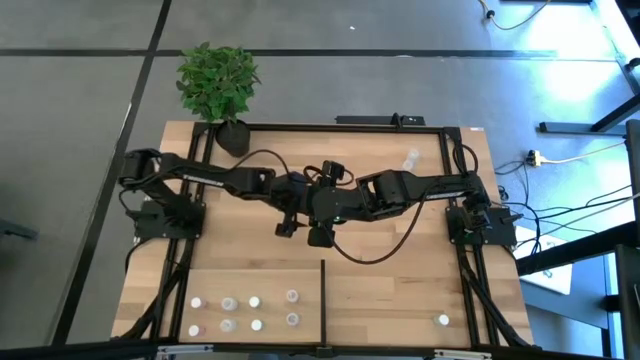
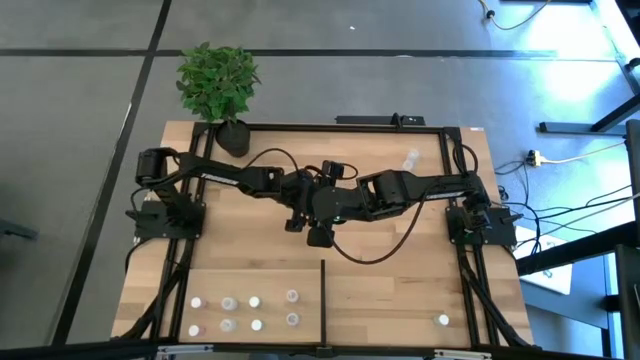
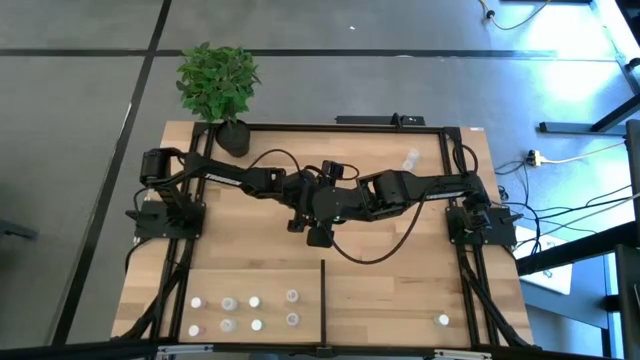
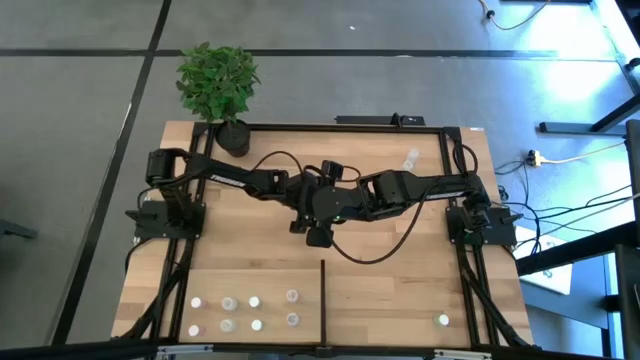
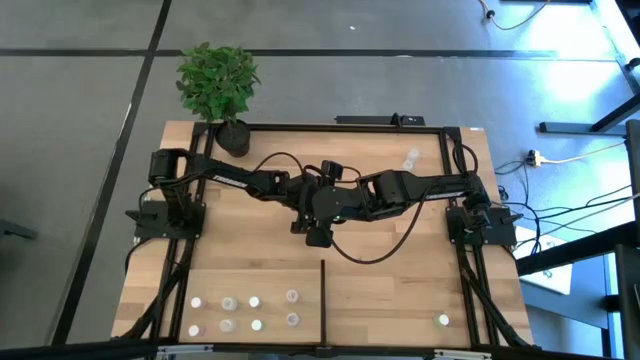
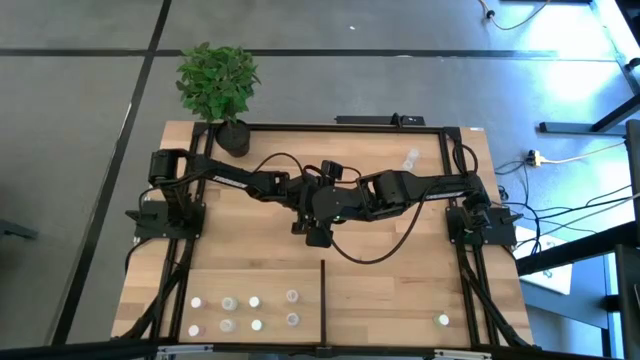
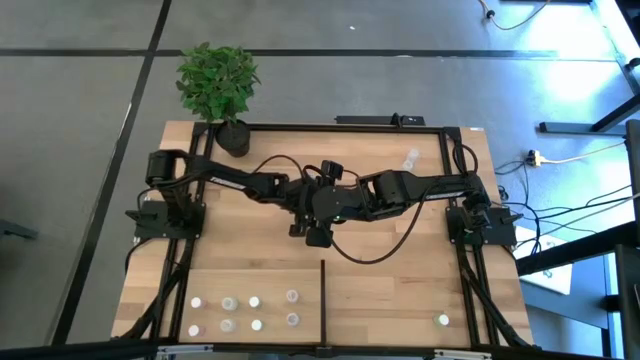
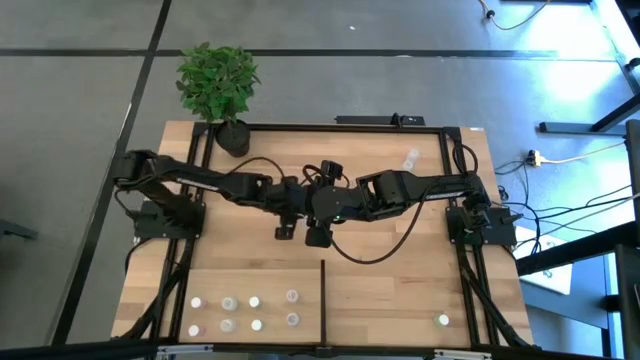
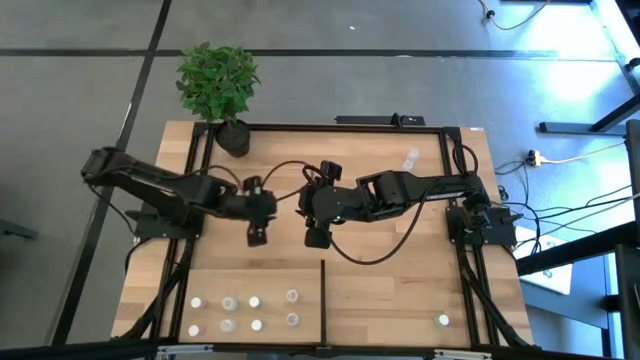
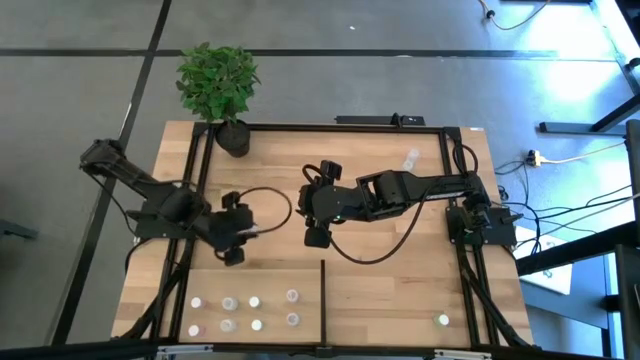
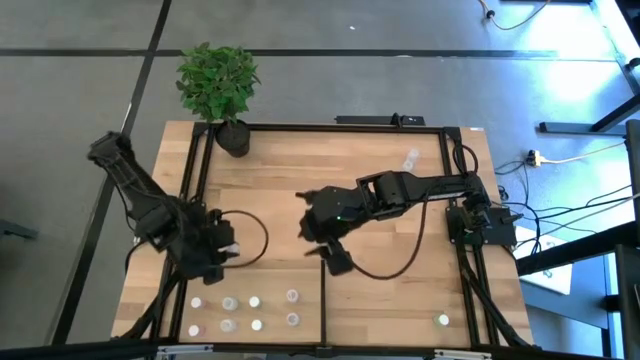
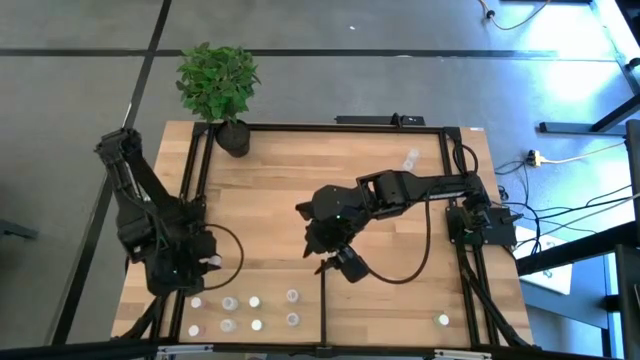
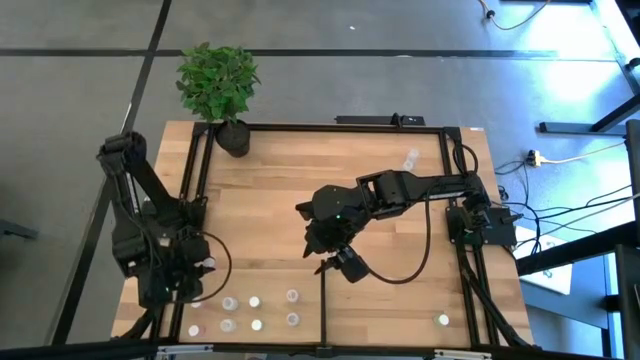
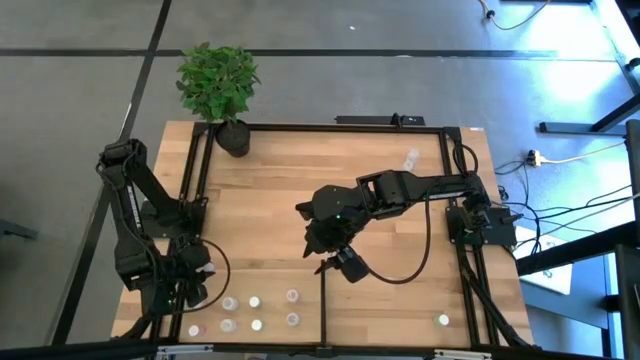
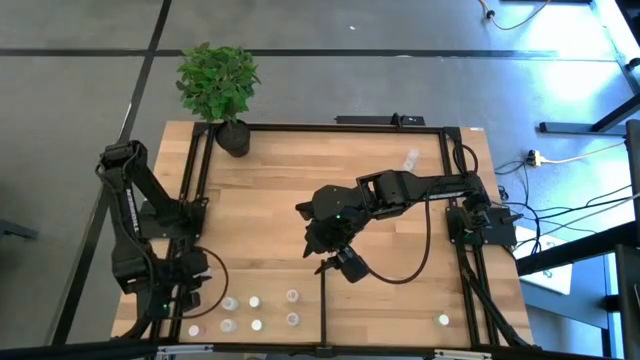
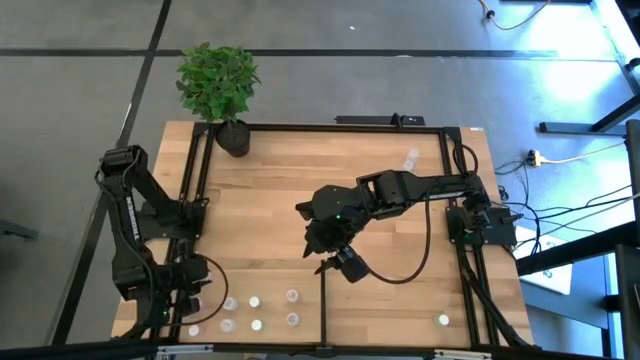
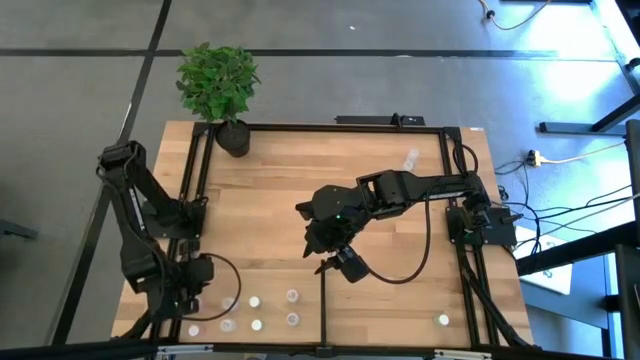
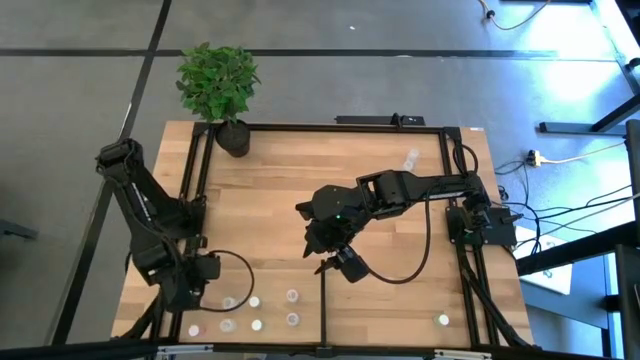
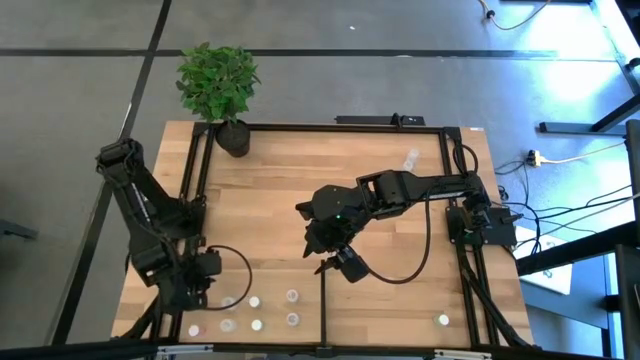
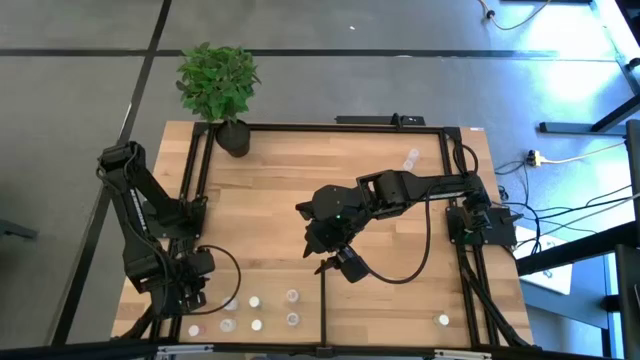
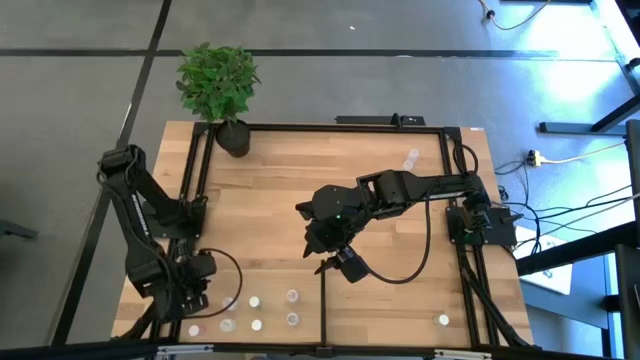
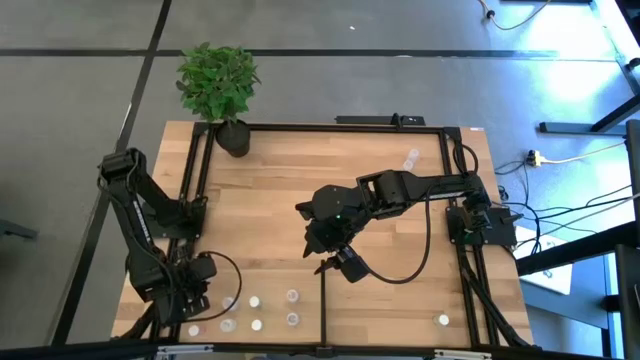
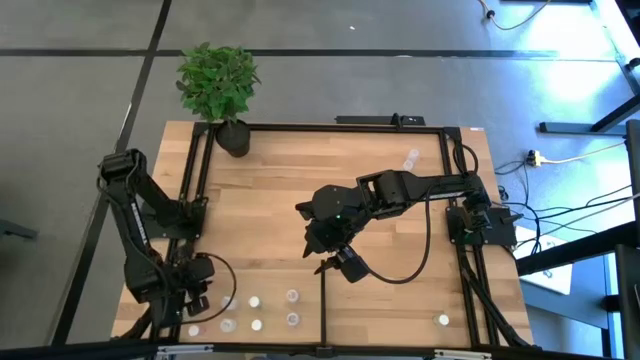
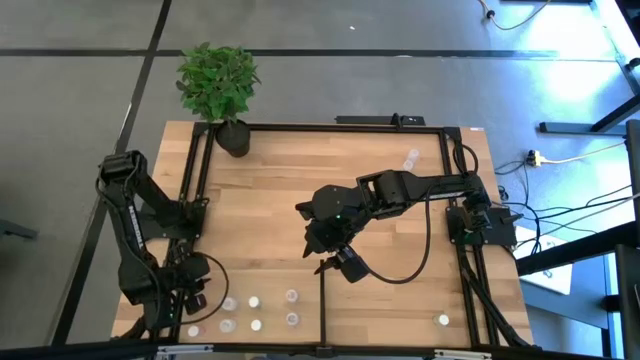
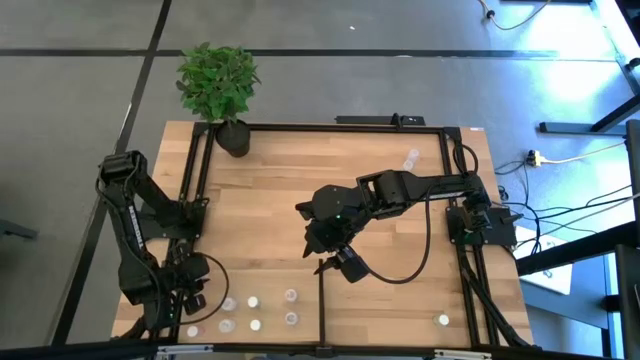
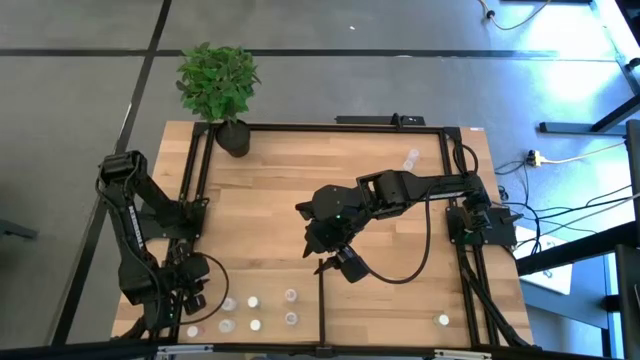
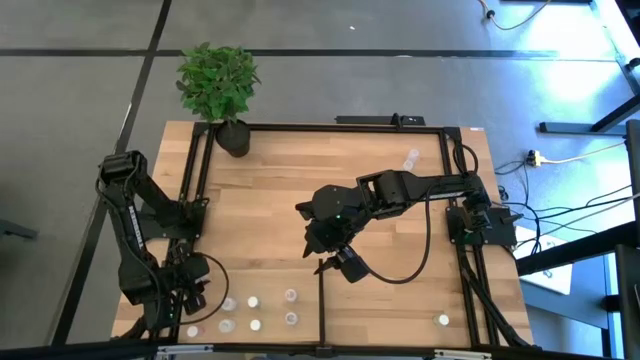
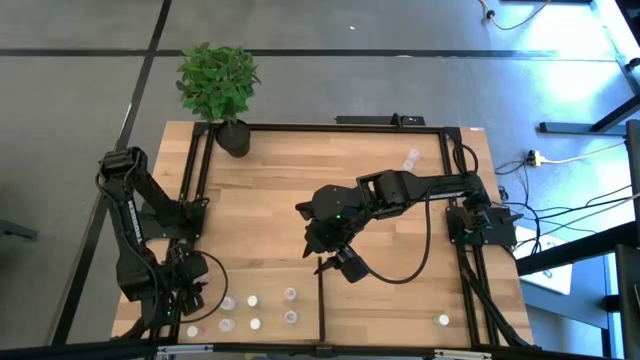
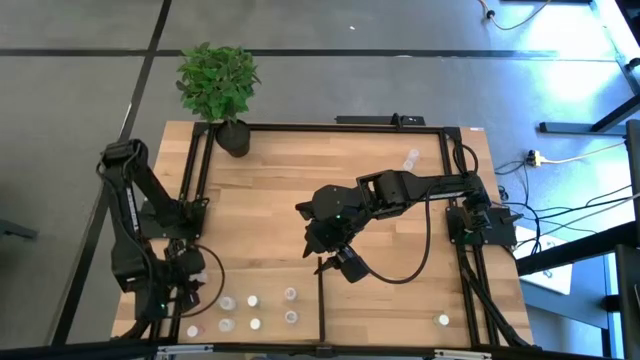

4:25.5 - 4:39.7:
Task: Pick and place medicine bottles onto shelf by color
Put the pink pill bottle on the shelf aligned with the other pink pill bottles

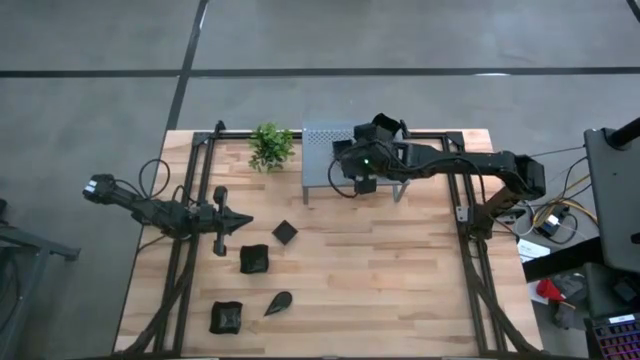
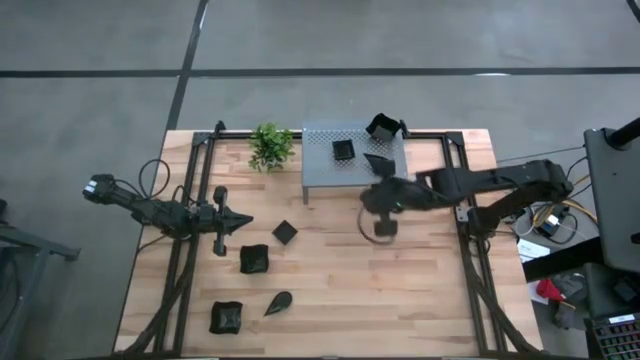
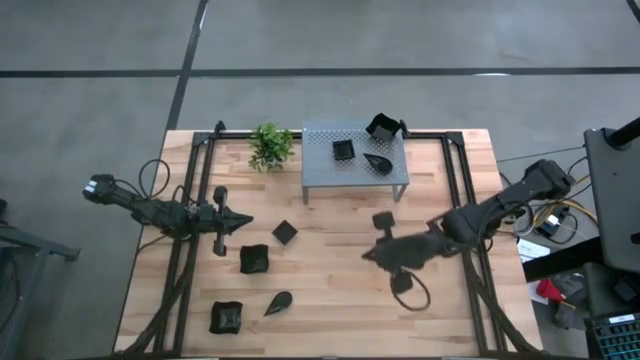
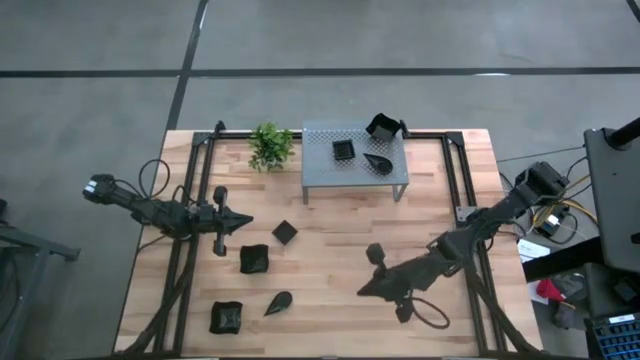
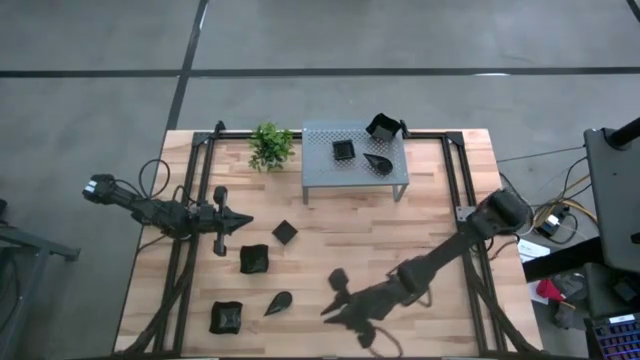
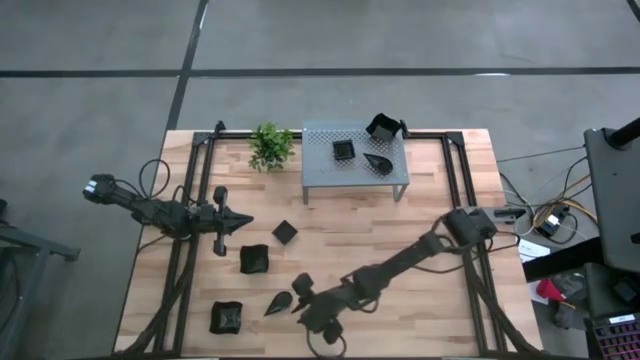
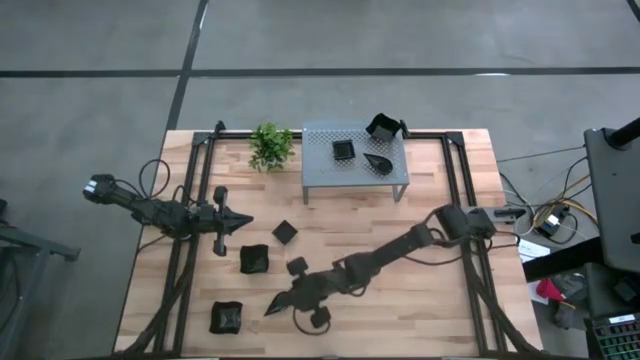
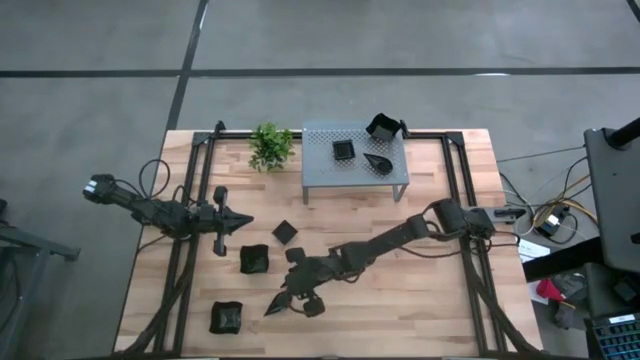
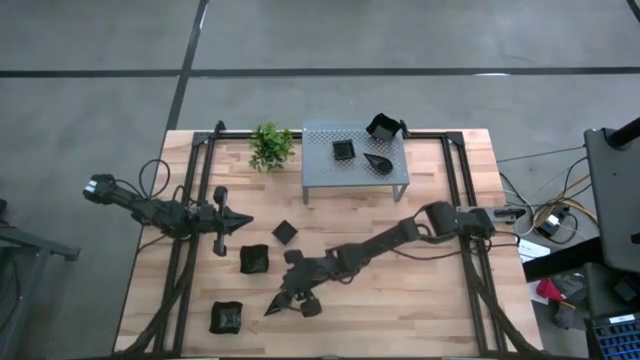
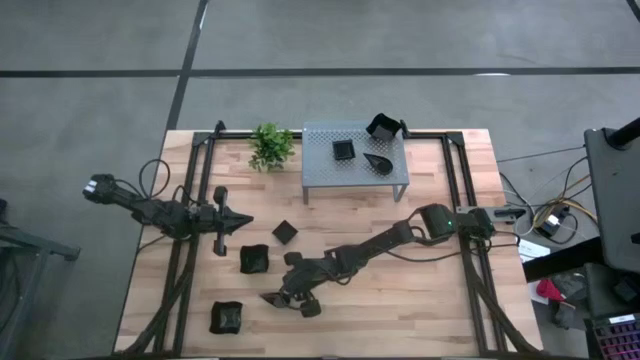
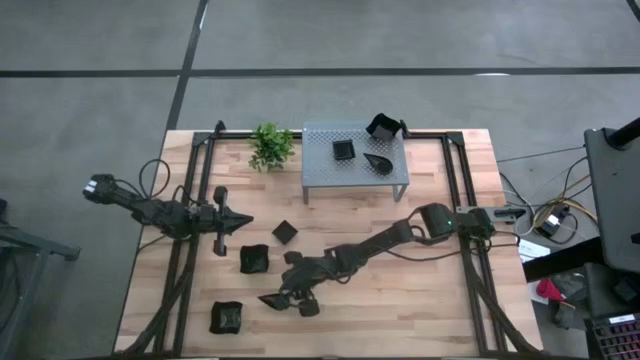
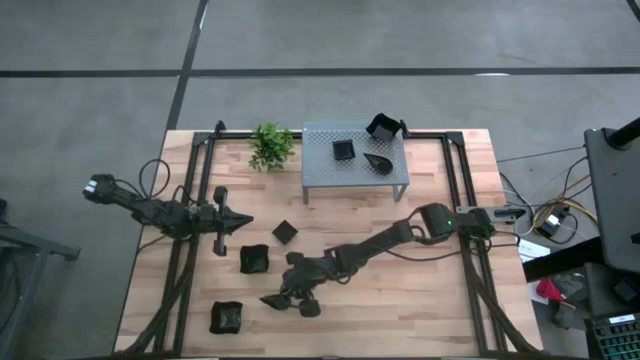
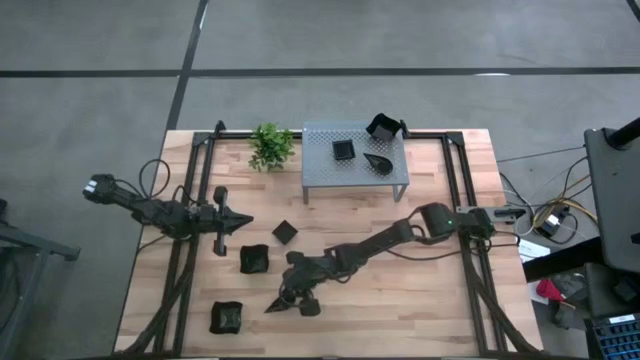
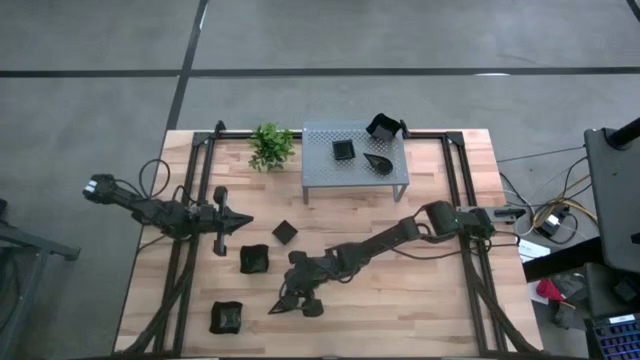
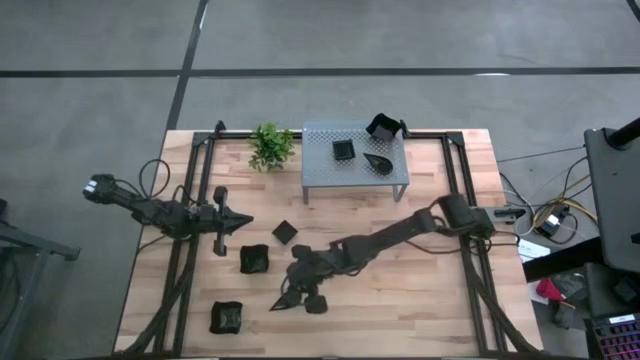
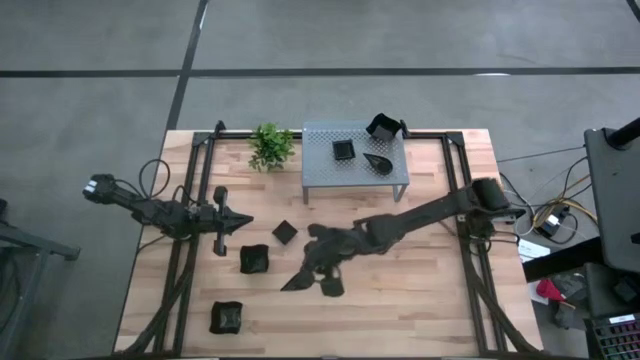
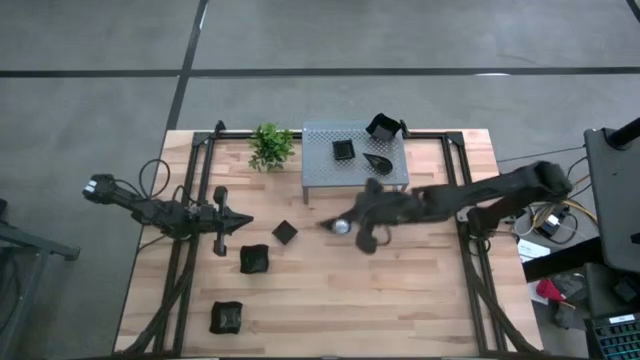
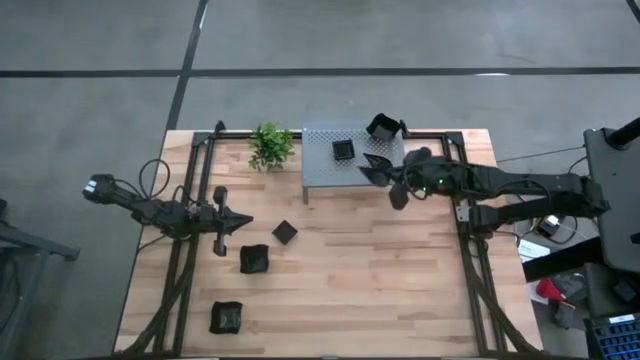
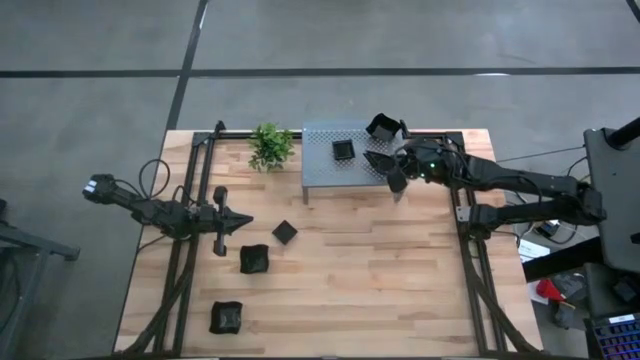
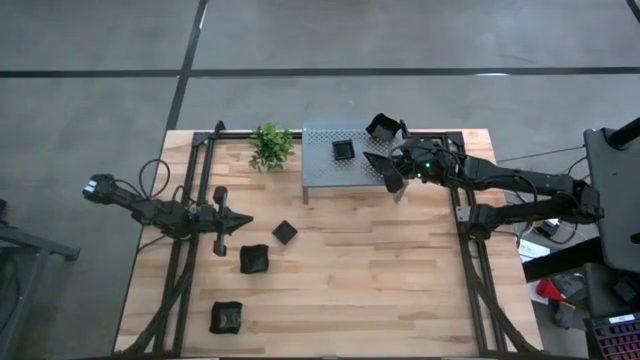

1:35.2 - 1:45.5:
Task: Pick & Place Mini shaped plates
Stack the drop shaped plate on top of the other drop shaped plate on the shelf
